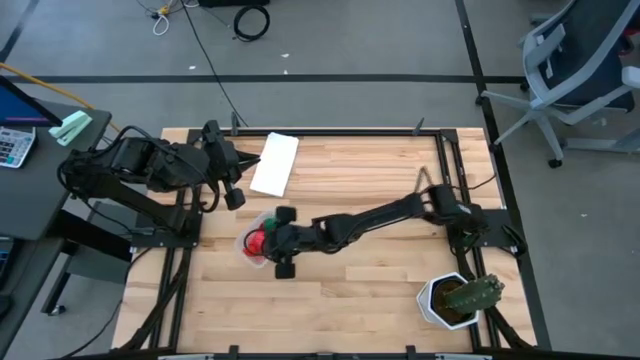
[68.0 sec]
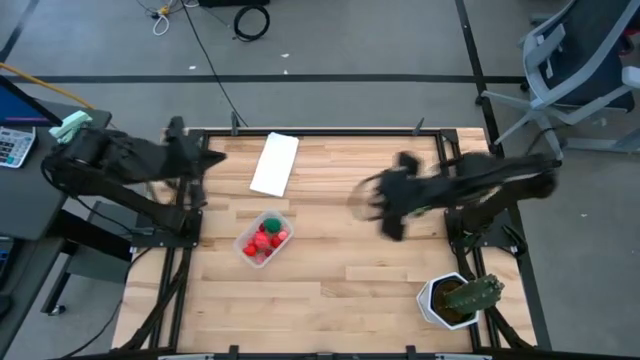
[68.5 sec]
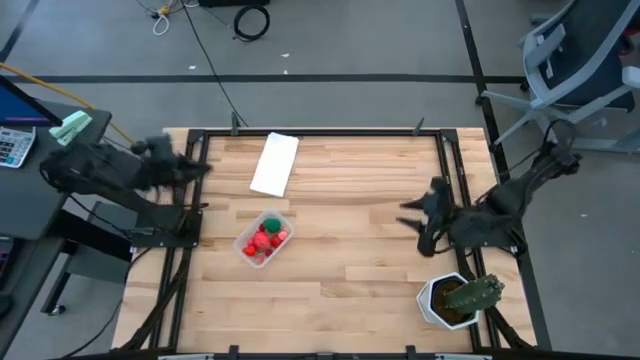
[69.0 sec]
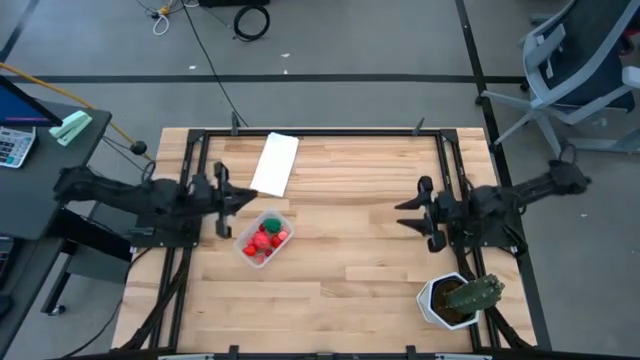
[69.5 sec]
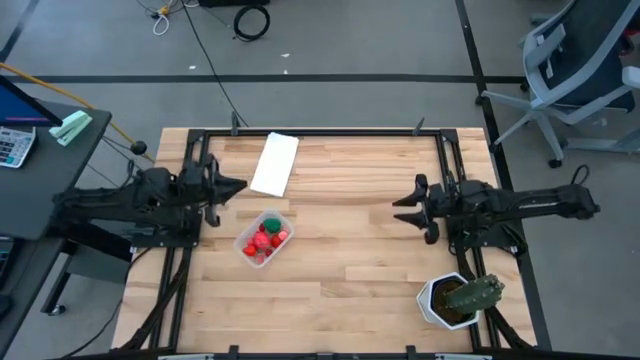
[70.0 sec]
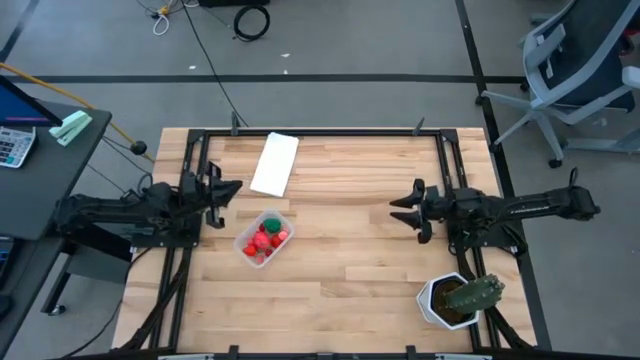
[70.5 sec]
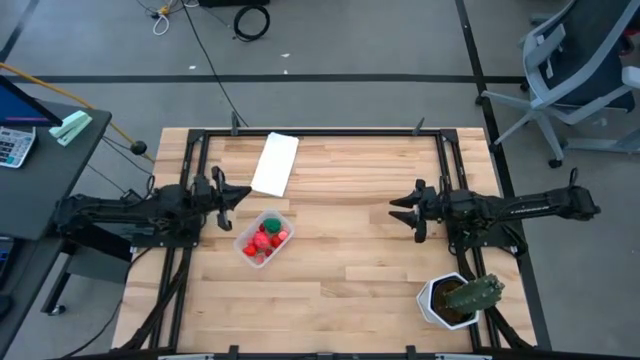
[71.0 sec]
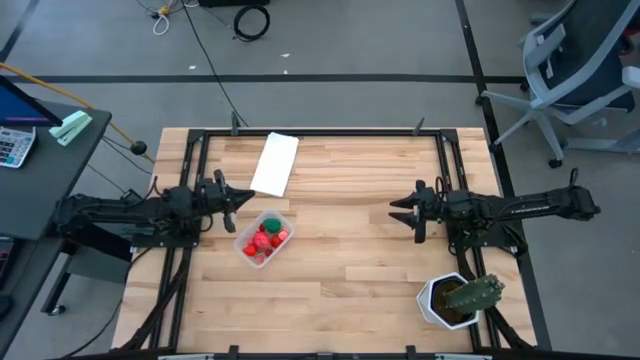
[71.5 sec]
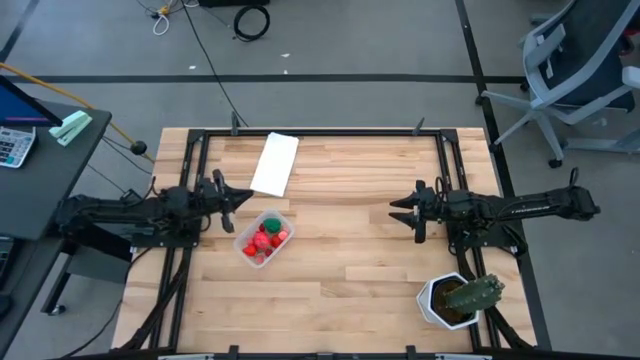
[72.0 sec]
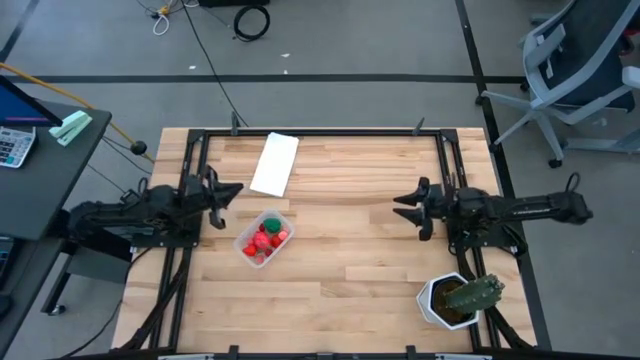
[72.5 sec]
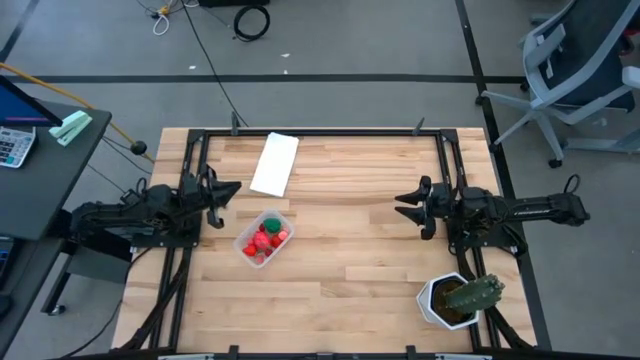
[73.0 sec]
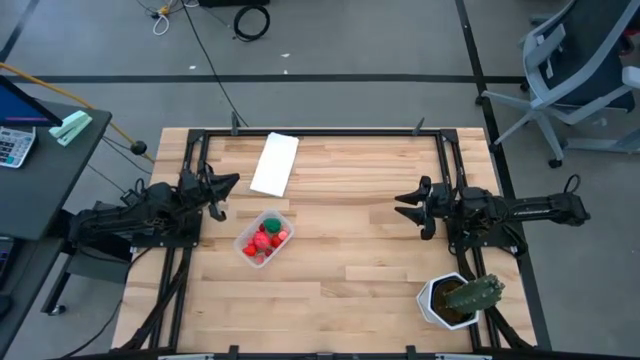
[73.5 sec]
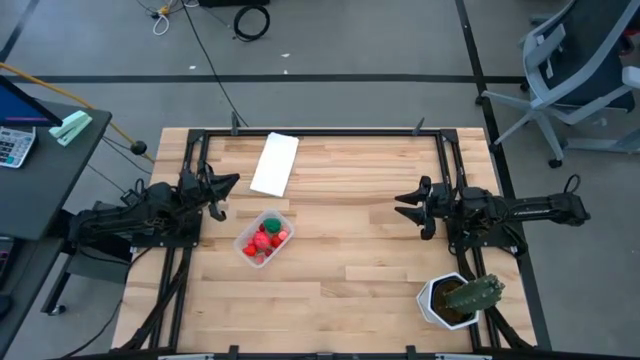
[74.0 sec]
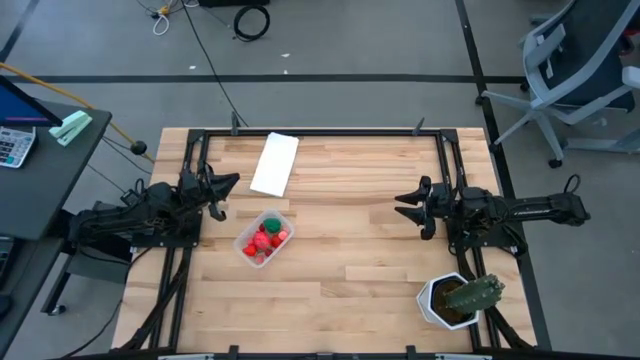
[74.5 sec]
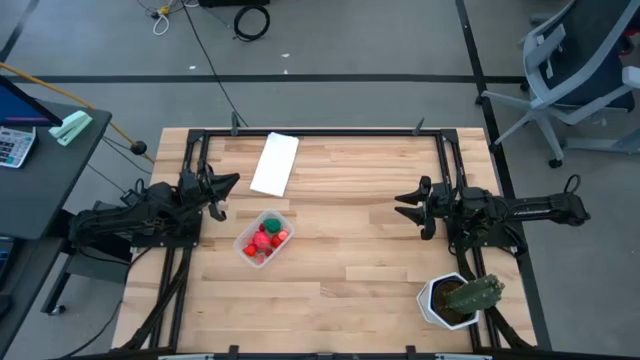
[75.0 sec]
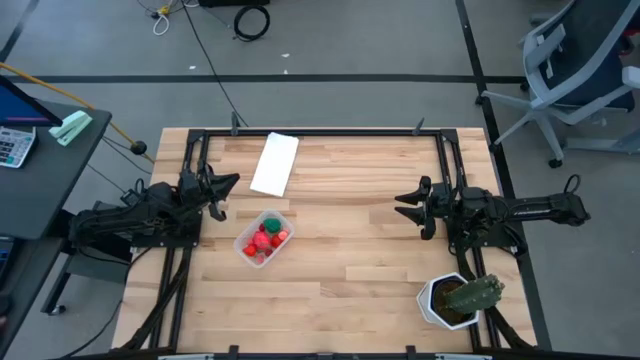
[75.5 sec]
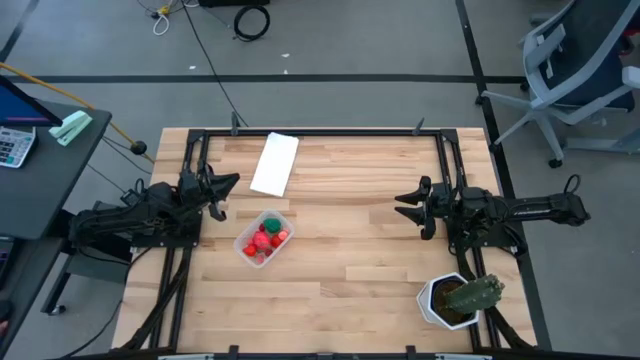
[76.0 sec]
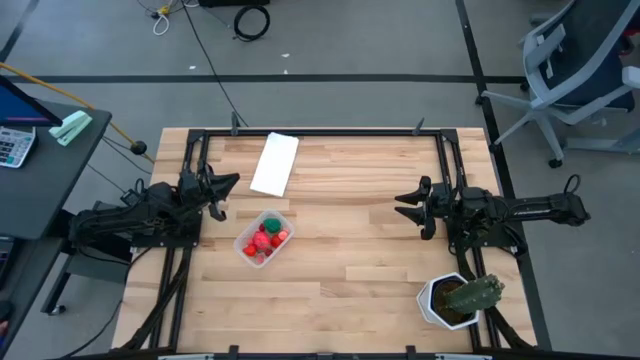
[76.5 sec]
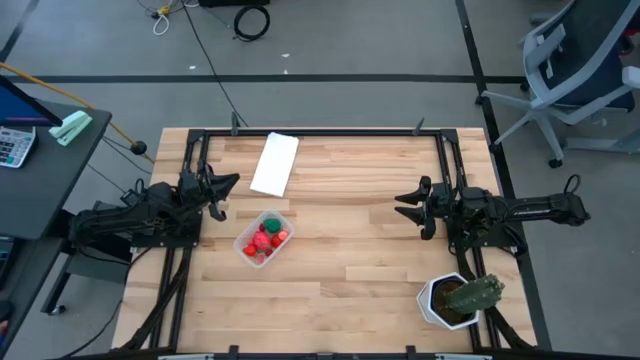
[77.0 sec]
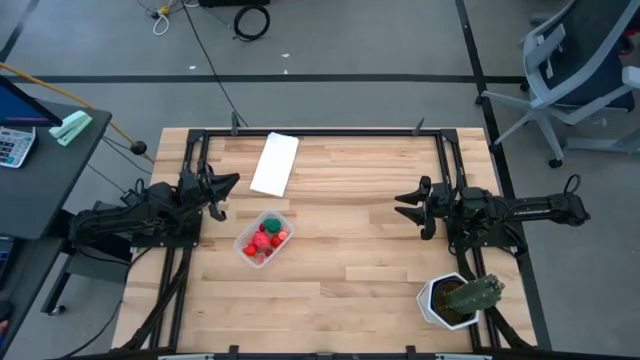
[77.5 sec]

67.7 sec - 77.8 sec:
Task: Pick and placing Produce into tupperware
Return to Home Position

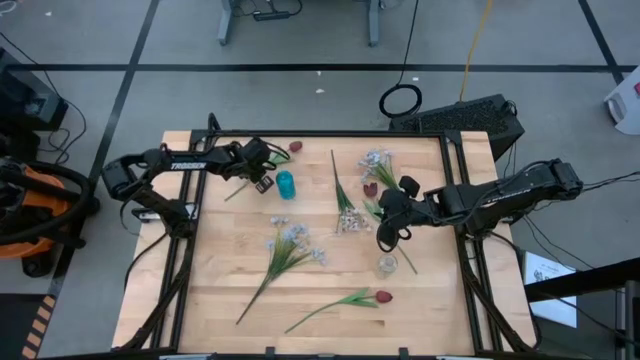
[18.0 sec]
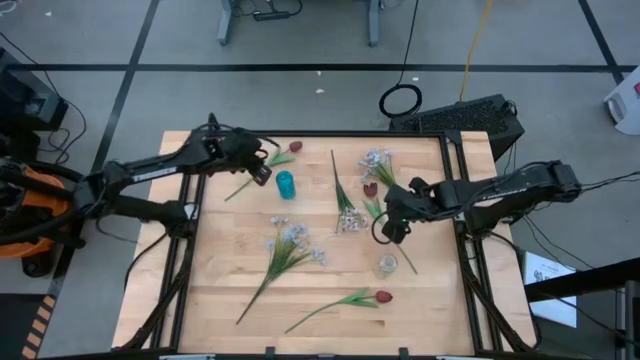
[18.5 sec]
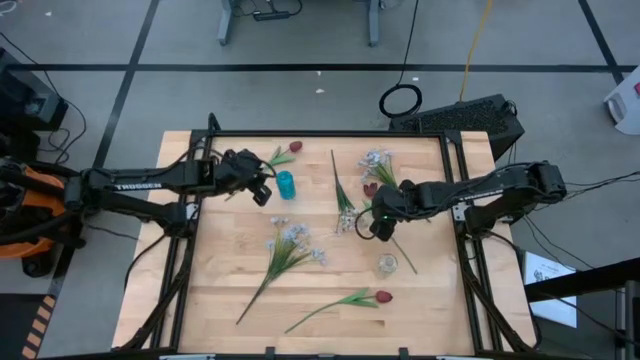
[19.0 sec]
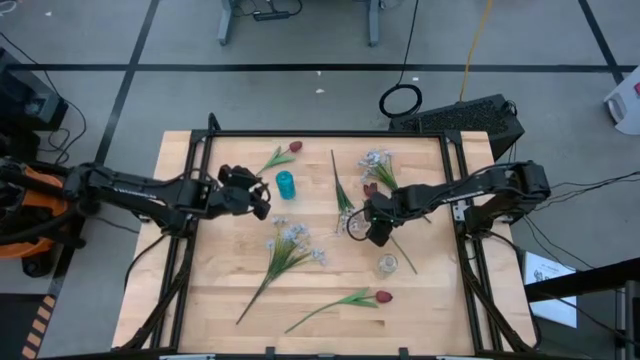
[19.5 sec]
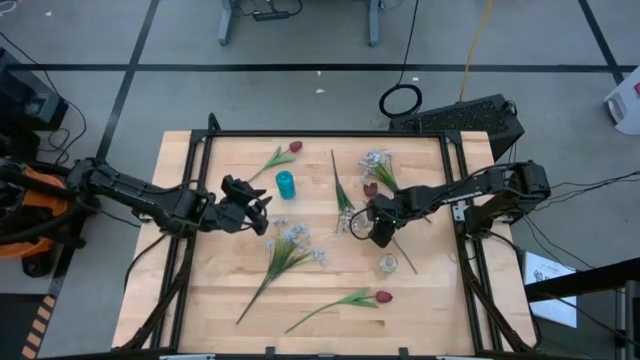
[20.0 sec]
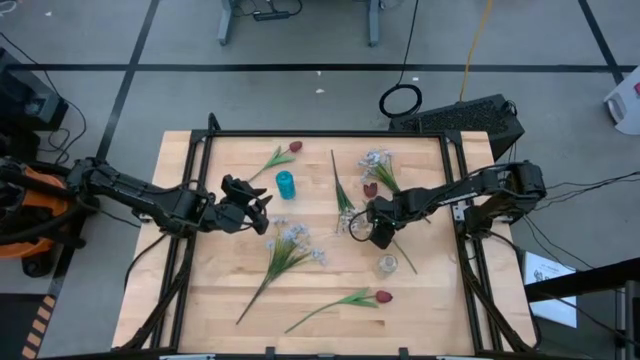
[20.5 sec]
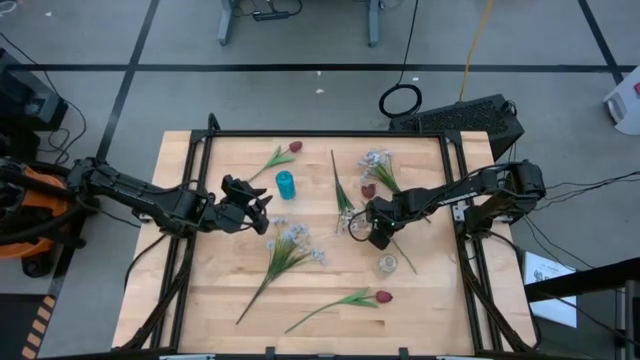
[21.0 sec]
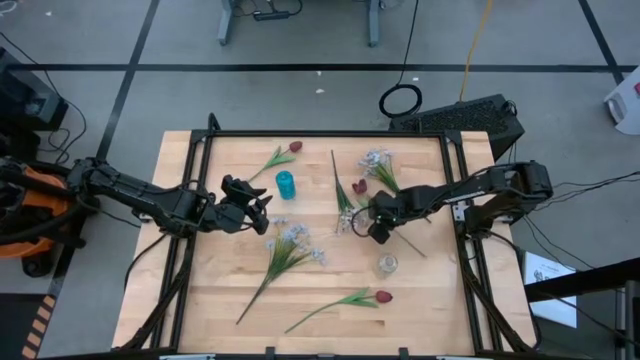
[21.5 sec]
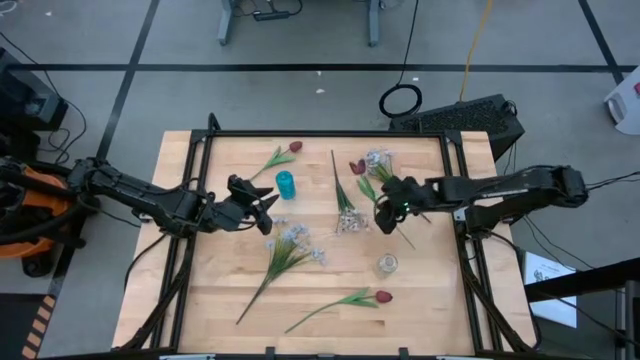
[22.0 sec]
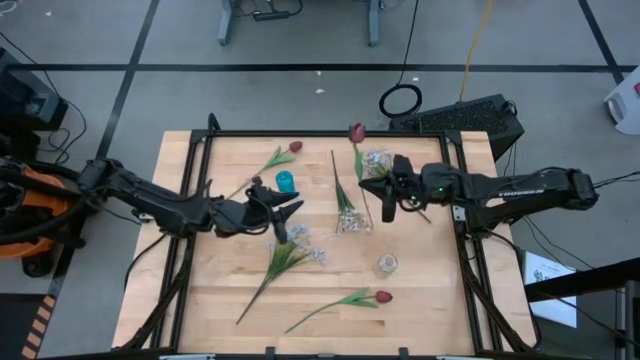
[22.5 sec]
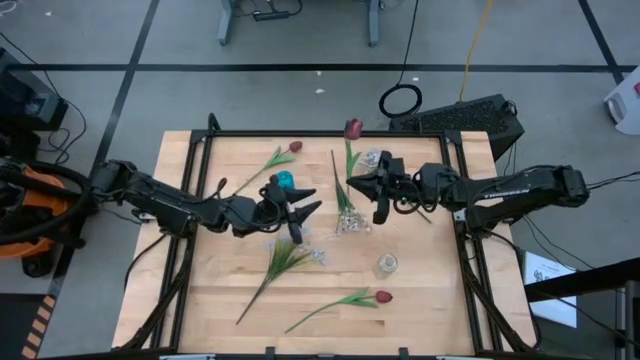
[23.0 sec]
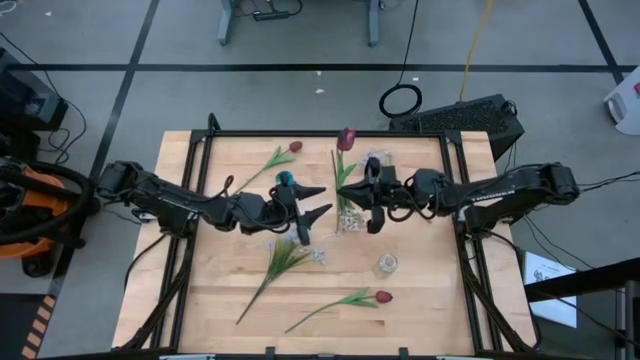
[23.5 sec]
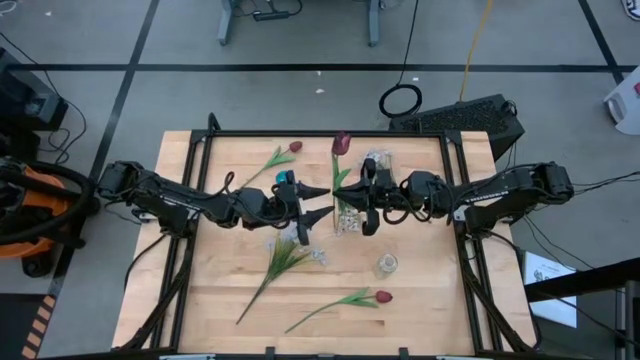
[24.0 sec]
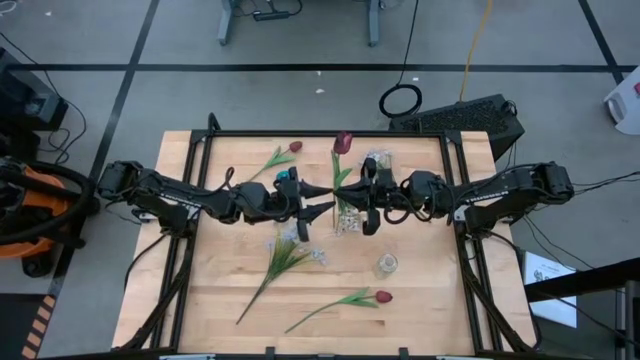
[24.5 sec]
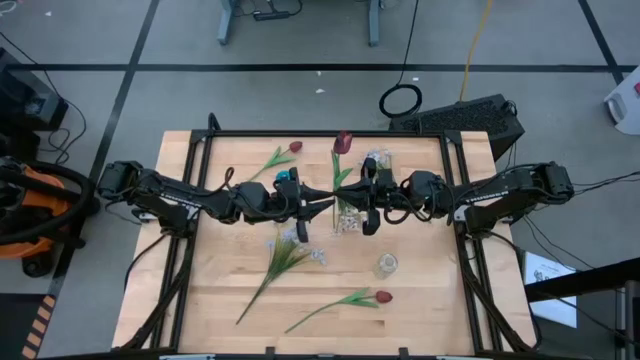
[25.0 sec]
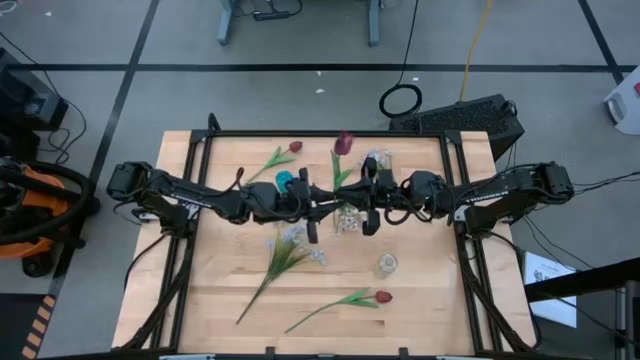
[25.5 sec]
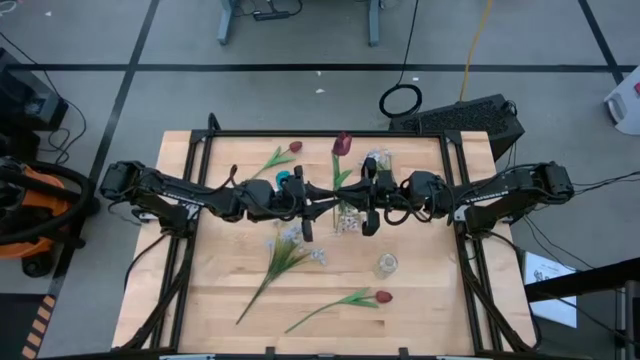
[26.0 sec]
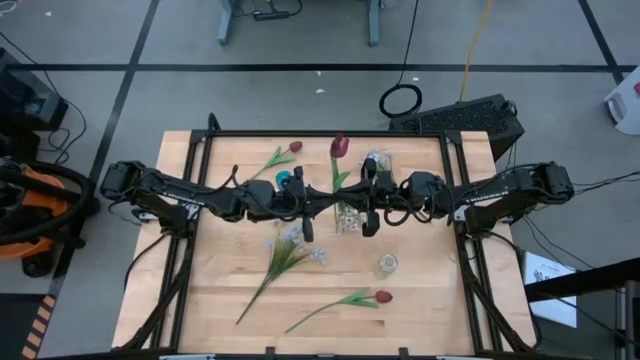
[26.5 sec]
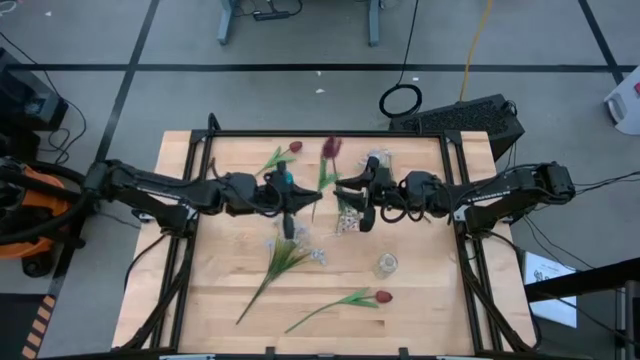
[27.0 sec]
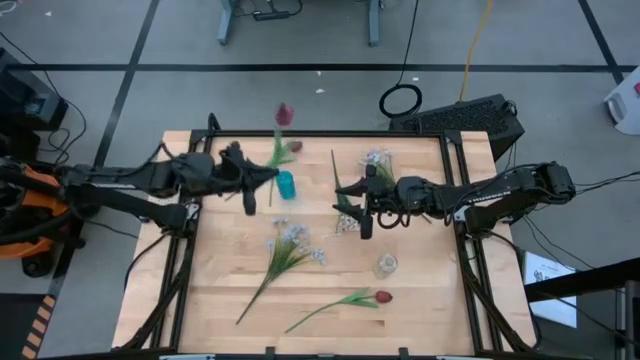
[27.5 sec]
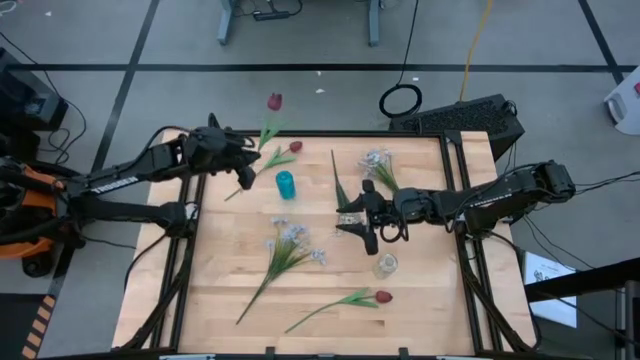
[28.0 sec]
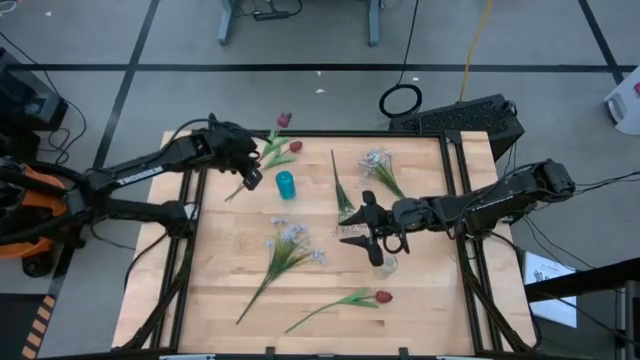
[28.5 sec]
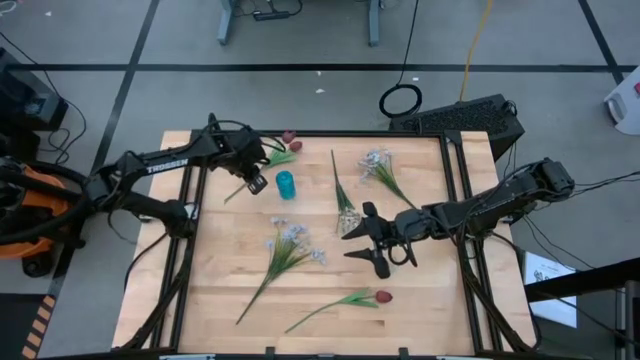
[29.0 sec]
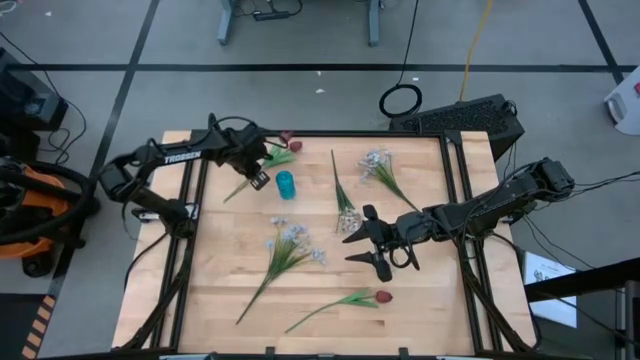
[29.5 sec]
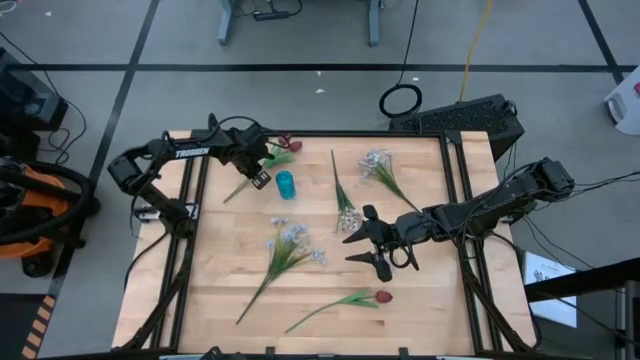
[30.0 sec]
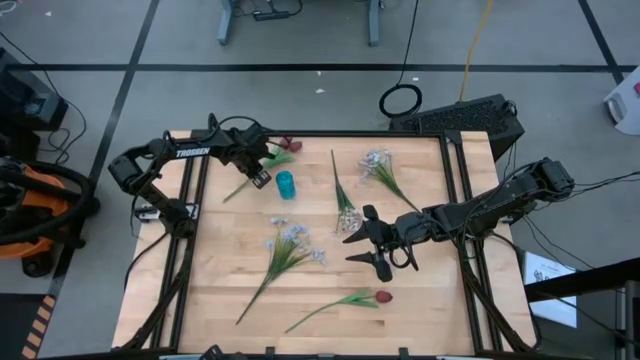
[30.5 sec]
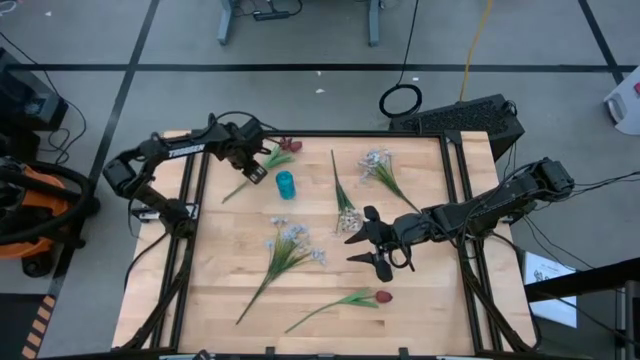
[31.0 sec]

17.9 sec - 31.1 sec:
Task: Sort flowers into vase by color
Move the middle red tulip to the top left of the table
